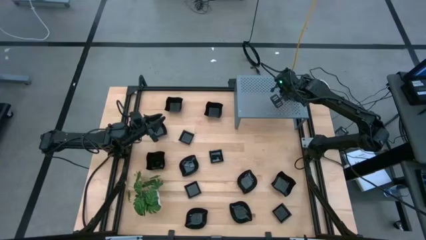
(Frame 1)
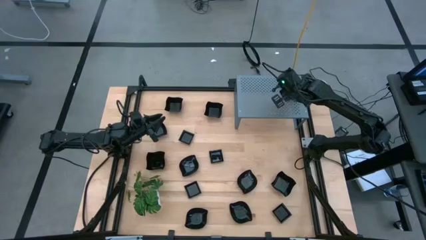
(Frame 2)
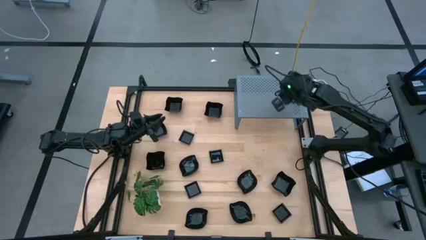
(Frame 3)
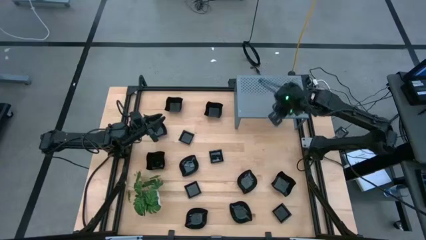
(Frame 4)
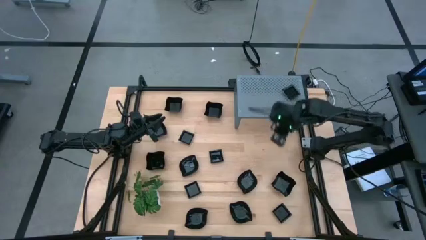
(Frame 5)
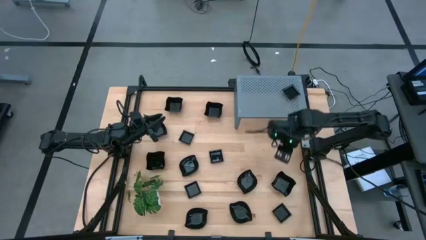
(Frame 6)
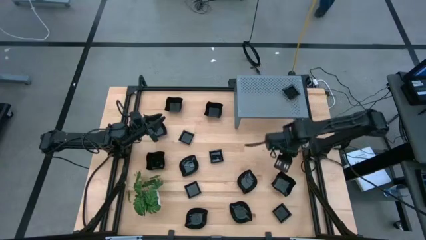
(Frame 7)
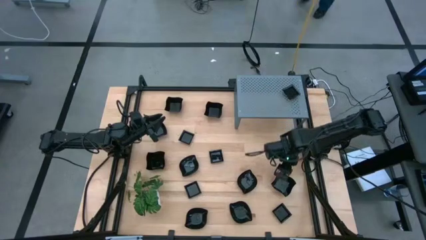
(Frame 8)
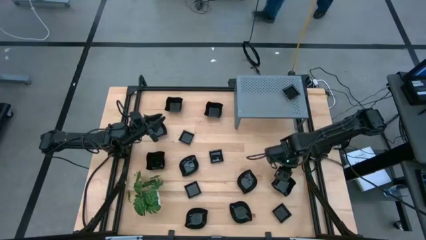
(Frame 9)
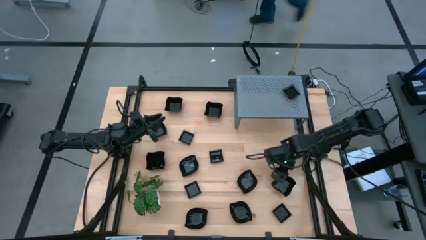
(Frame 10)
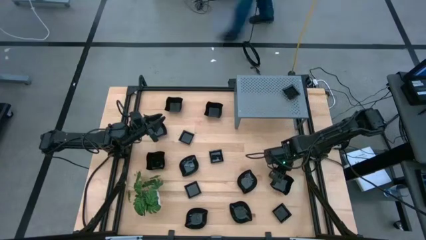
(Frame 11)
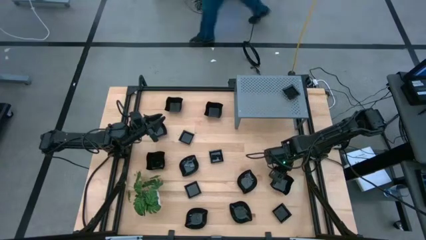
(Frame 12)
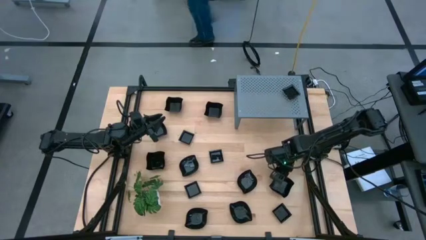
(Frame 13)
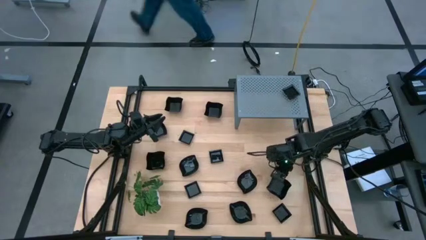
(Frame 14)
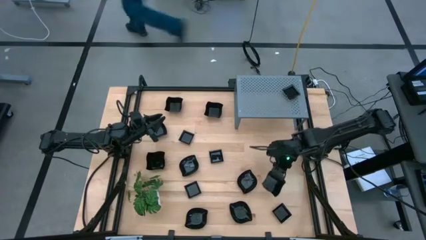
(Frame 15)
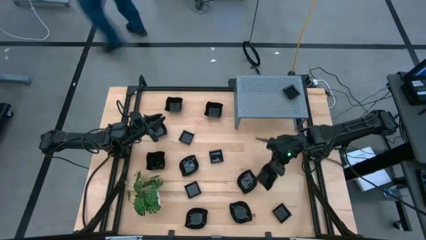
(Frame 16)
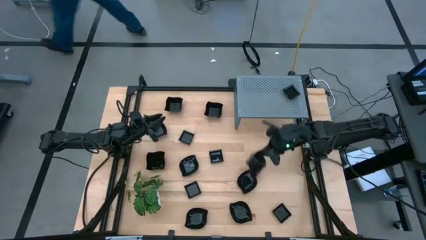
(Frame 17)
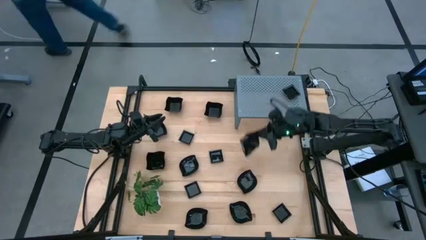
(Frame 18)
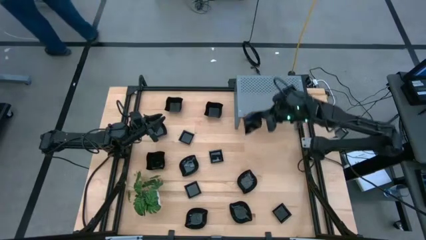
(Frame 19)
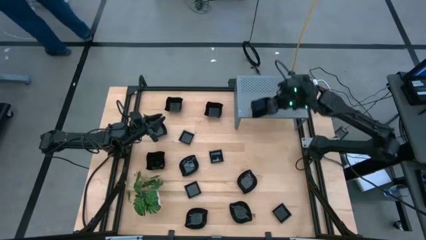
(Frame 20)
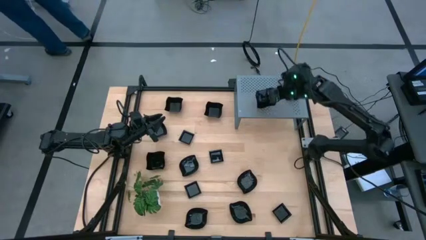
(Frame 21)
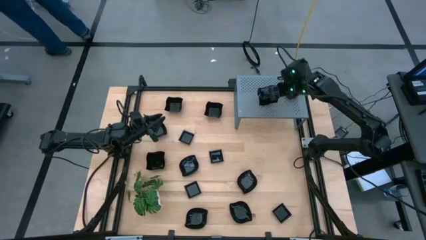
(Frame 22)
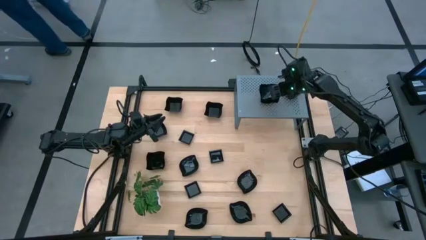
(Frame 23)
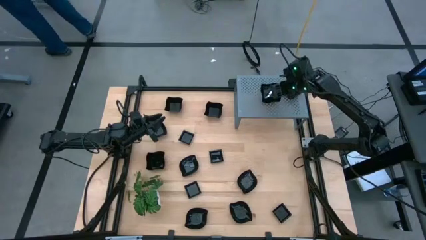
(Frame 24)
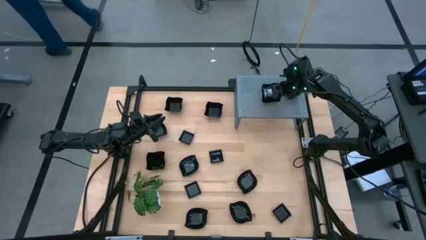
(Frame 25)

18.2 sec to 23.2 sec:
Task: Pick & Place Mini shaped plates
Put the black distorted square plate on the shelf

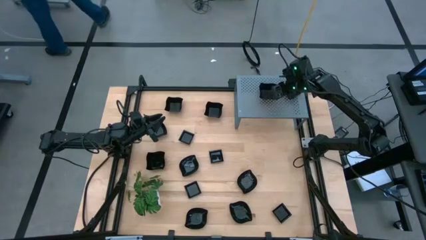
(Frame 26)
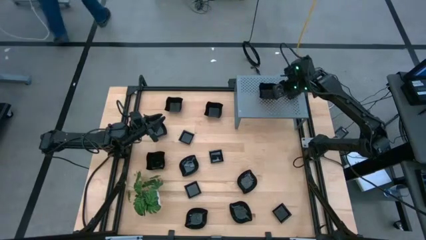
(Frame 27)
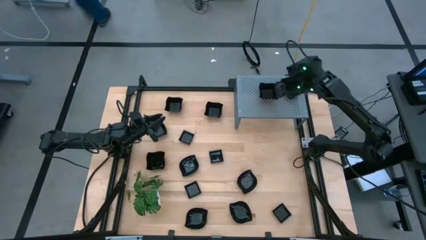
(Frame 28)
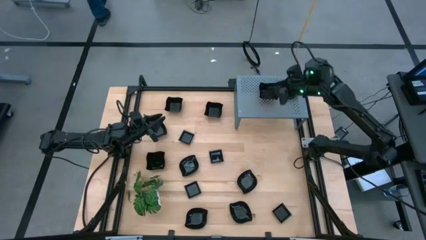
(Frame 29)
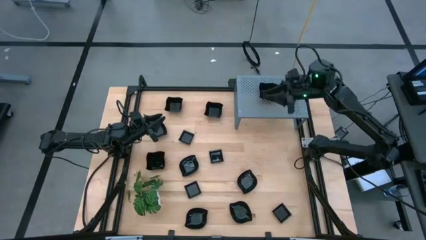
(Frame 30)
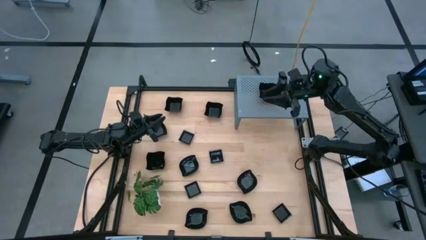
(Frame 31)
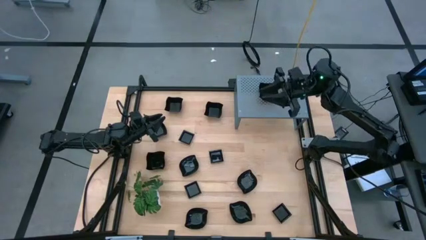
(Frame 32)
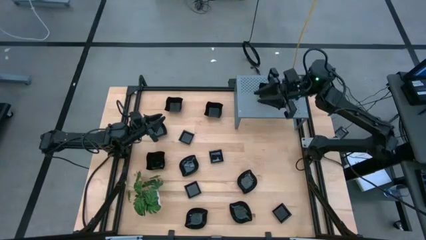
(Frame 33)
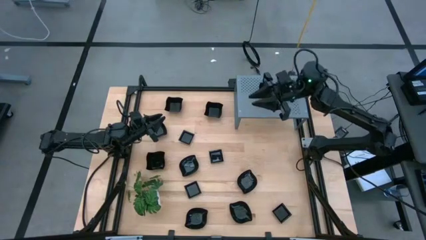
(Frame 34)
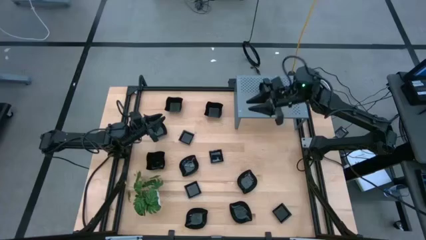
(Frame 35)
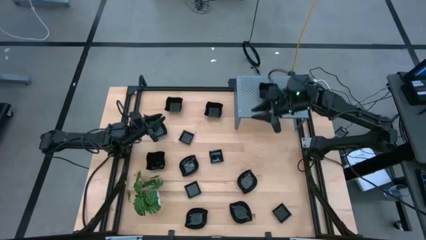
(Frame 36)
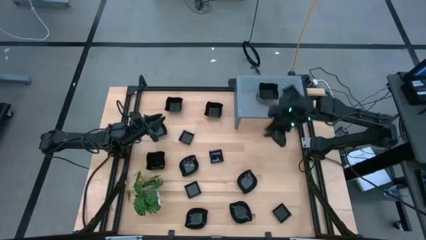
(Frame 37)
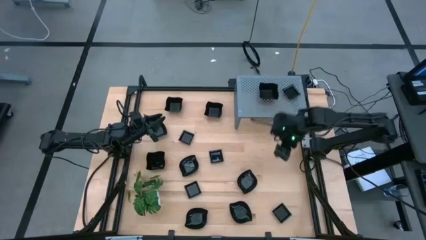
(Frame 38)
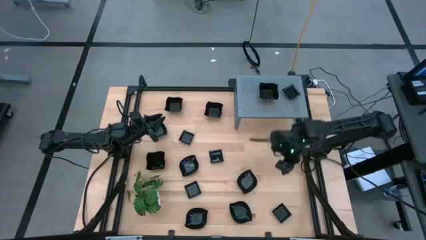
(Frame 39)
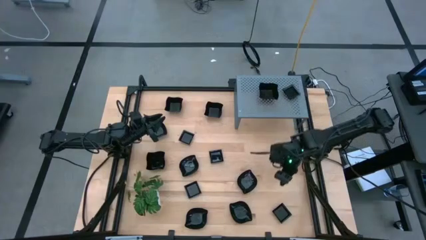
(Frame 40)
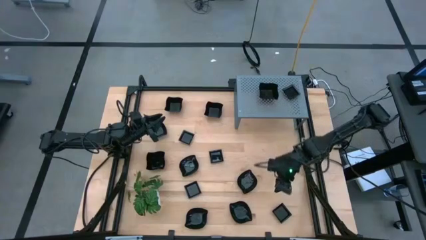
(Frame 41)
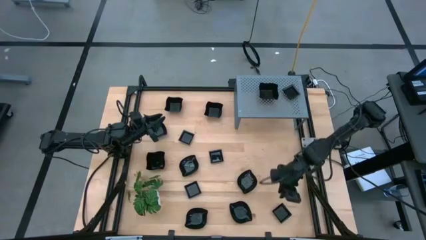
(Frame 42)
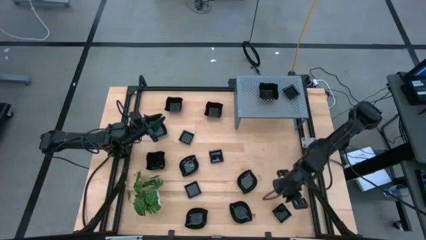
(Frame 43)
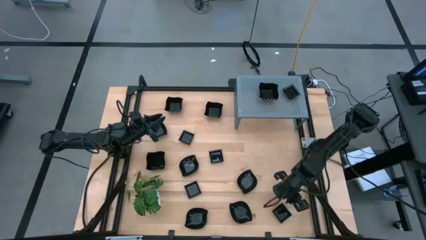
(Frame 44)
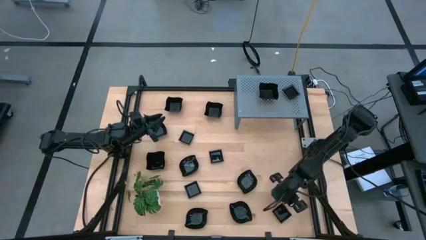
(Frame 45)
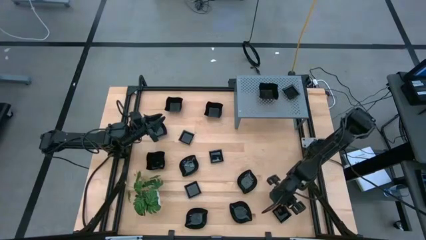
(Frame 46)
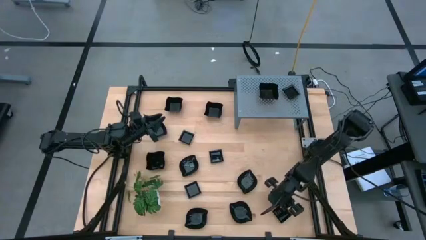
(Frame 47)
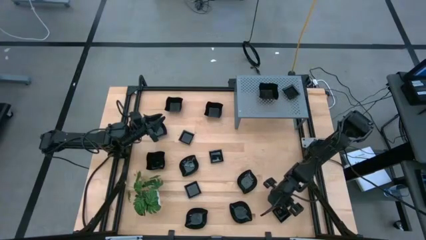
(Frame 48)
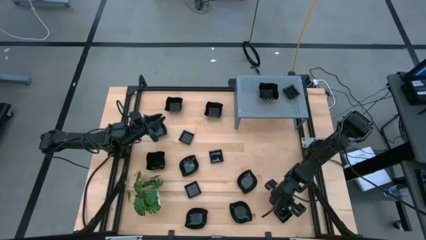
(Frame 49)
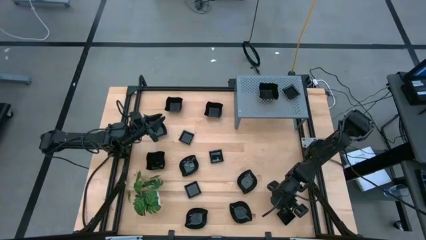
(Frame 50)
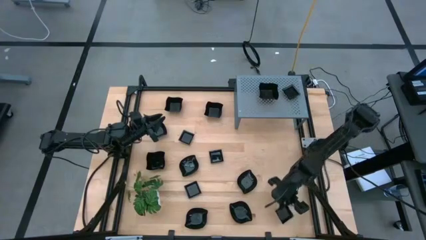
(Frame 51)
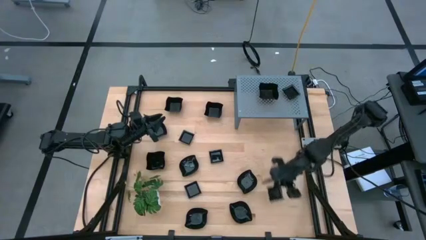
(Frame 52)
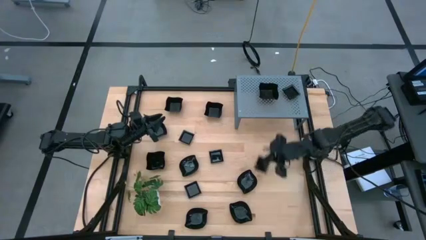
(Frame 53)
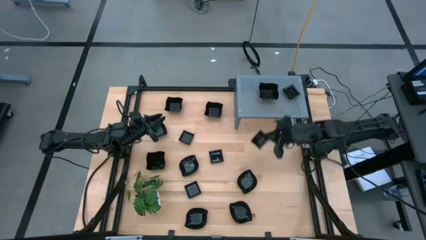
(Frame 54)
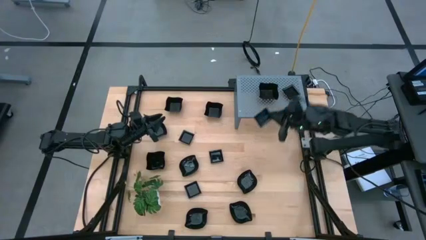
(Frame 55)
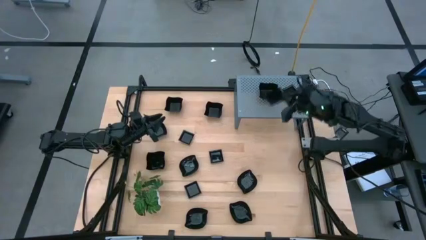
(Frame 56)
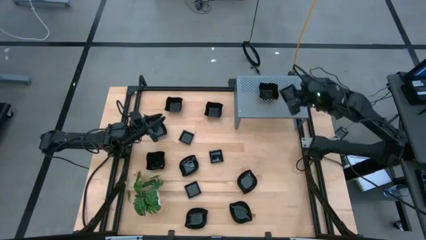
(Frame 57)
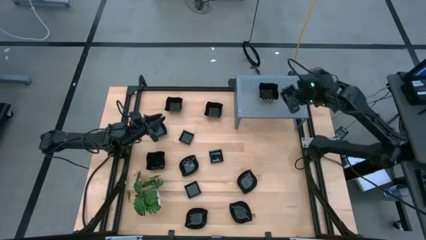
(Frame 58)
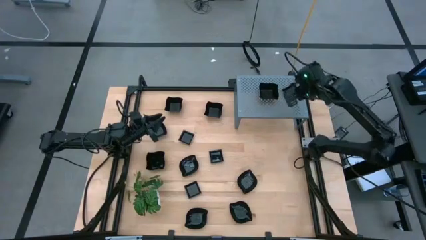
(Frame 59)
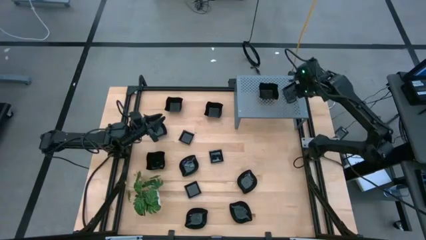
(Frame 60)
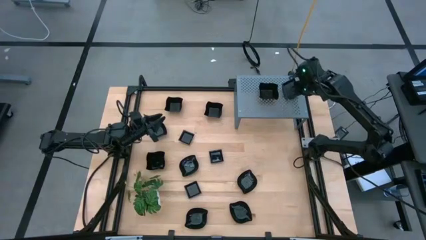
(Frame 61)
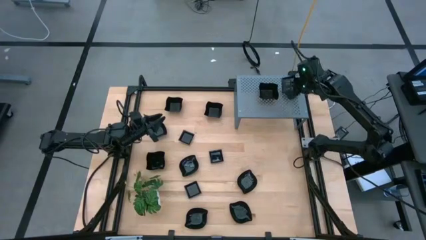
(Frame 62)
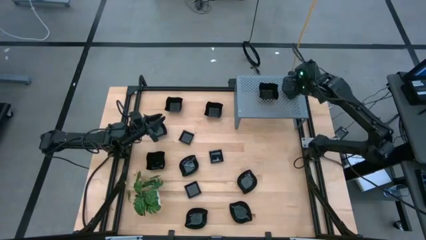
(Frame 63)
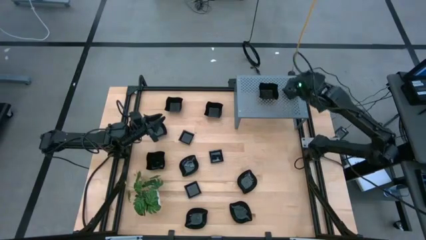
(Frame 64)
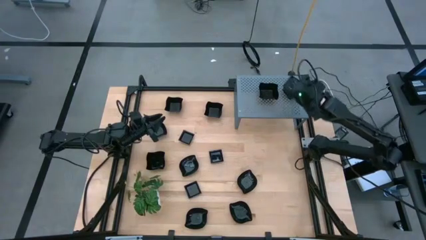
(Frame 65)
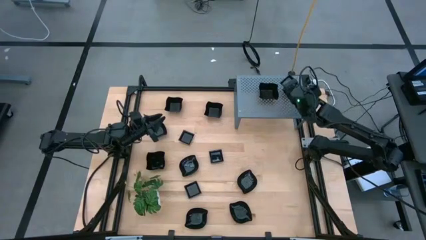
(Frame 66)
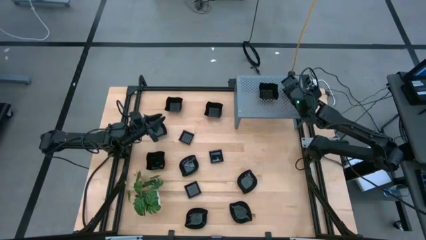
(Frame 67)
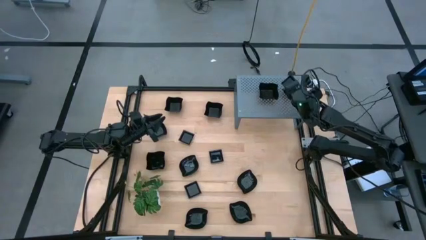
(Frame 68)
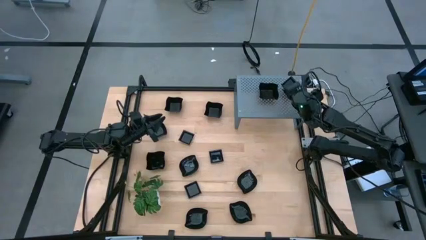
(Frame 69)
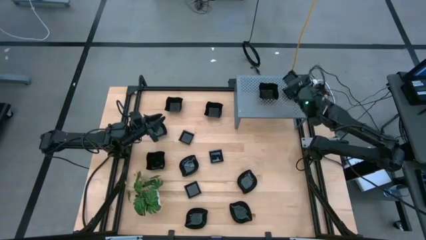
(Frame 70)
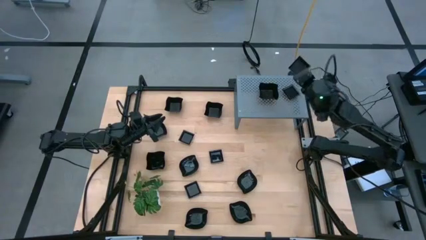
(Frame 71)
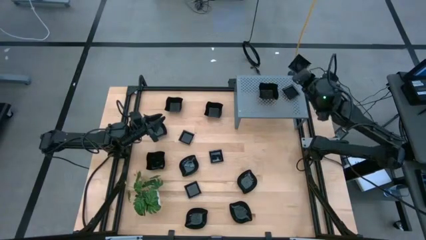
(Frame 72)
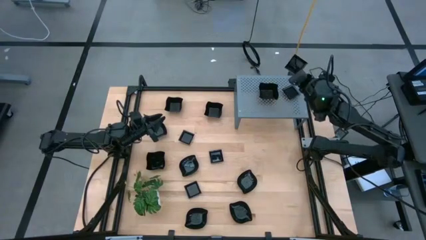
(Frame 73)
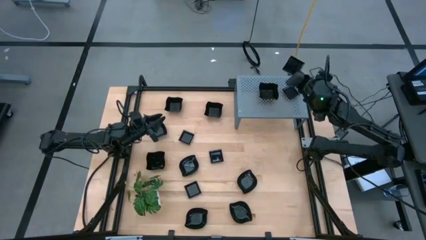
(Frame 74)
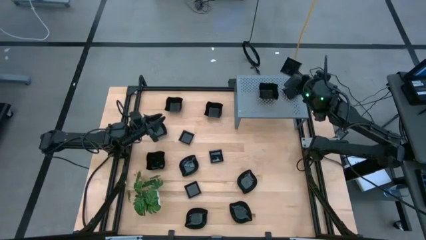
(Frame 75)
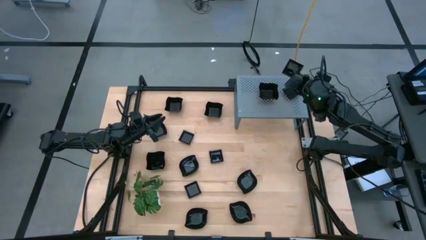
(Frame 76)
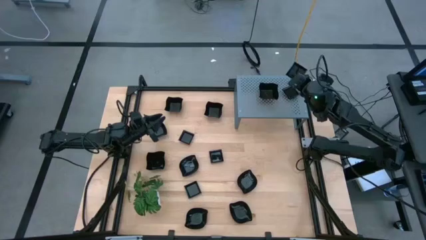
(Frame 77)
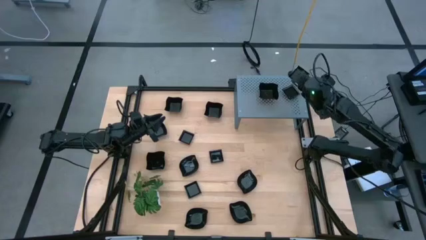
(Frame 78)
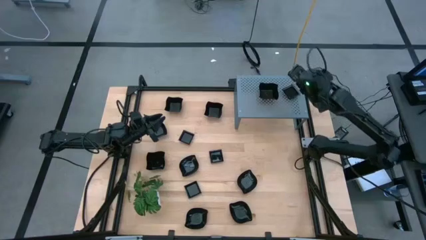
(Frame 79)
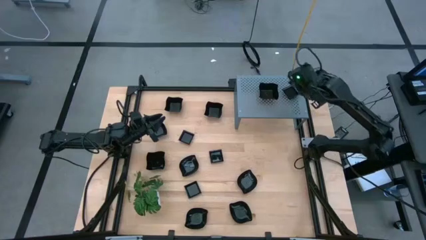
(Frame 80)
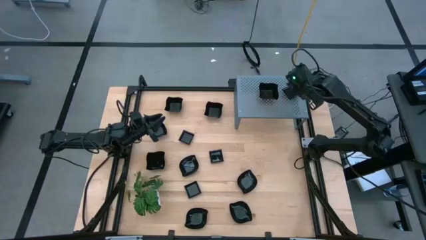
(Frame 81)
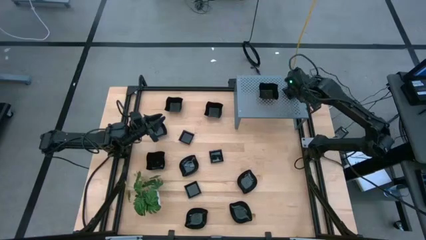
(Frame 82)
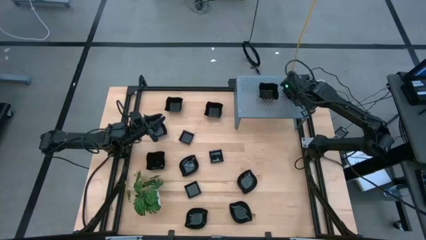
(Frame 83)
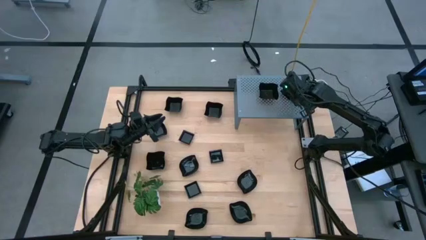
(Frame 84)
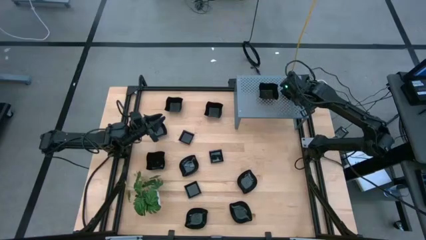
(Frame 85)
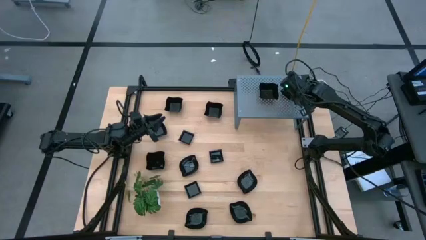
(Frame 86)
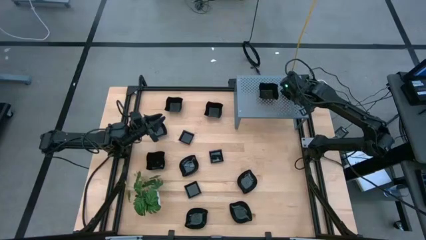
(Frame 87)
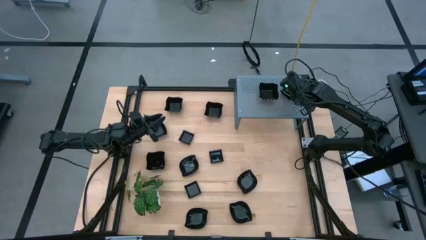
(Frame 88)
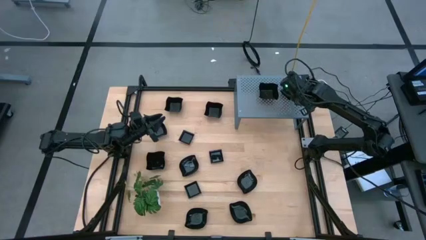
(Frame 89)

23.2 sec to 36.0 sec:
Stack the black square plate on the black square plates on the shelf
